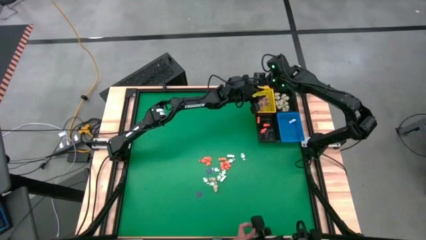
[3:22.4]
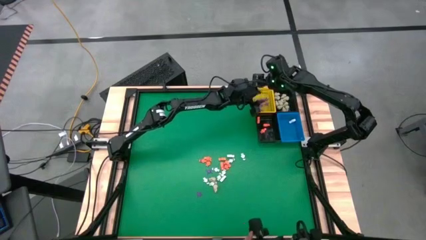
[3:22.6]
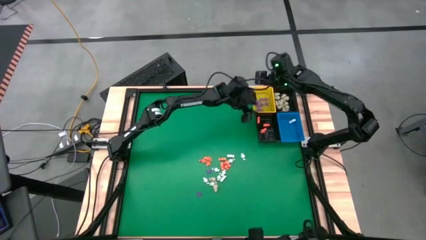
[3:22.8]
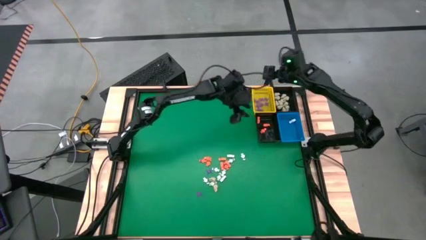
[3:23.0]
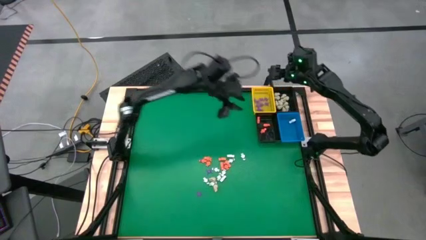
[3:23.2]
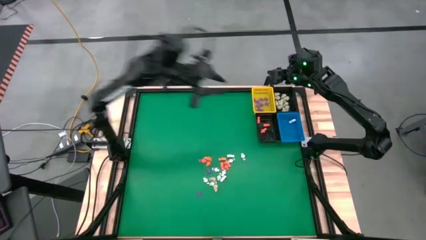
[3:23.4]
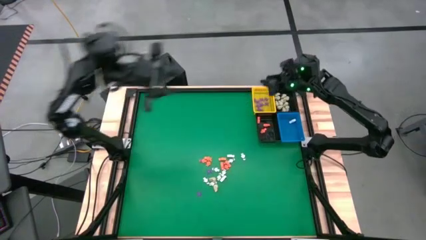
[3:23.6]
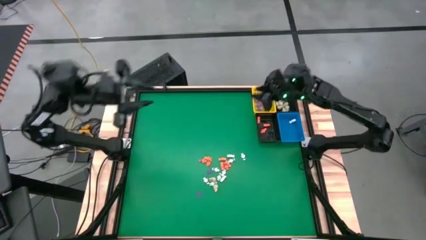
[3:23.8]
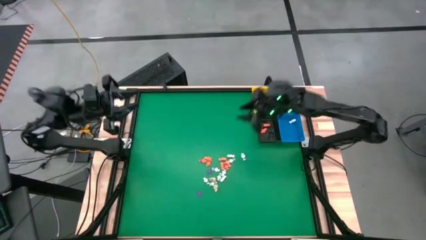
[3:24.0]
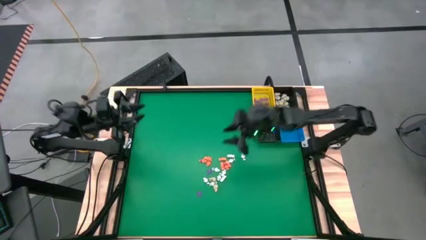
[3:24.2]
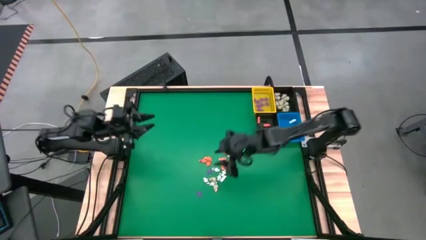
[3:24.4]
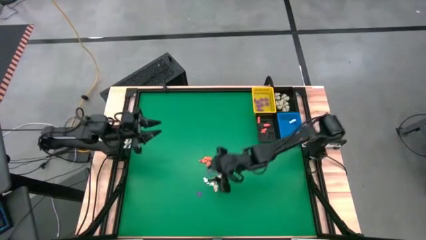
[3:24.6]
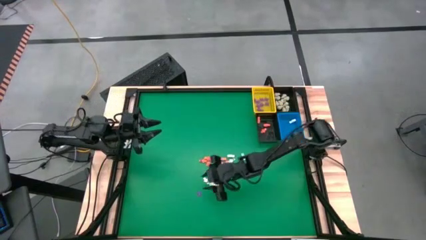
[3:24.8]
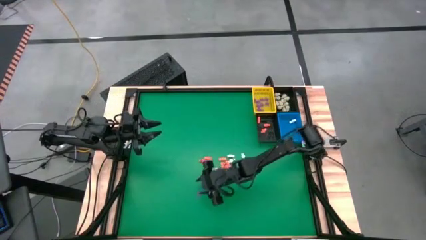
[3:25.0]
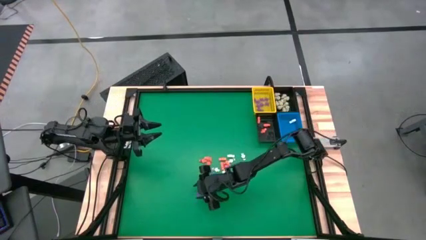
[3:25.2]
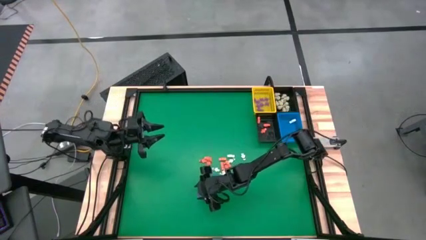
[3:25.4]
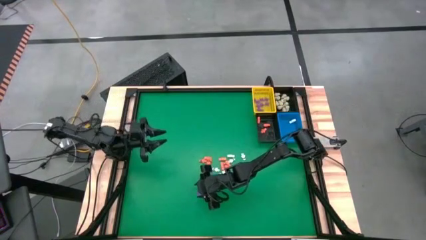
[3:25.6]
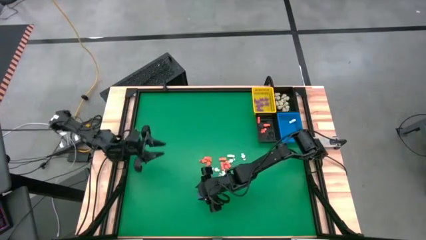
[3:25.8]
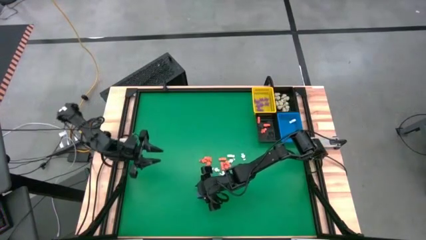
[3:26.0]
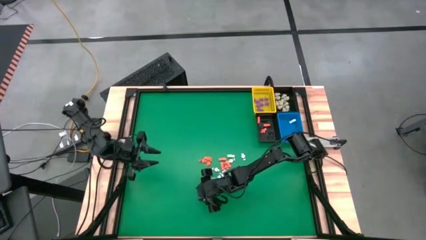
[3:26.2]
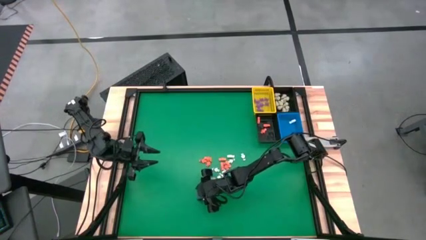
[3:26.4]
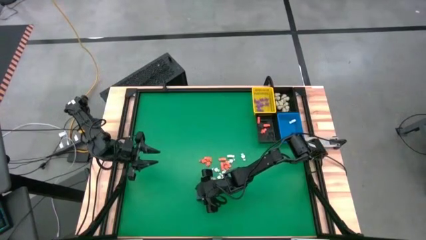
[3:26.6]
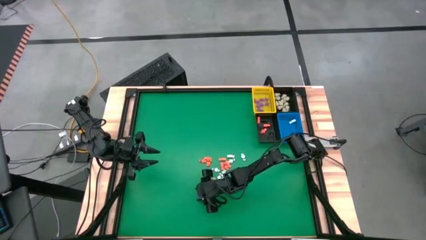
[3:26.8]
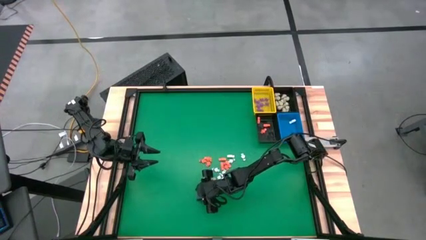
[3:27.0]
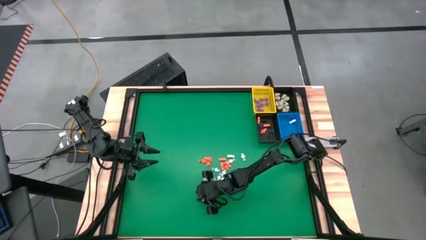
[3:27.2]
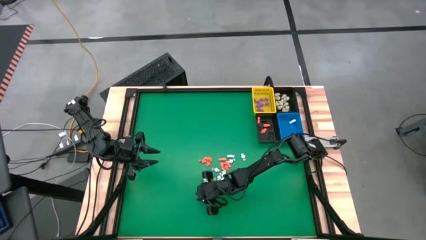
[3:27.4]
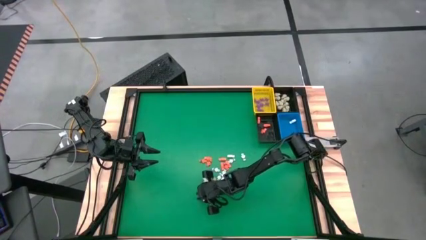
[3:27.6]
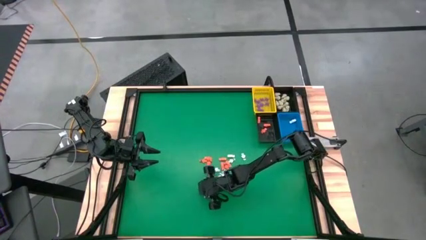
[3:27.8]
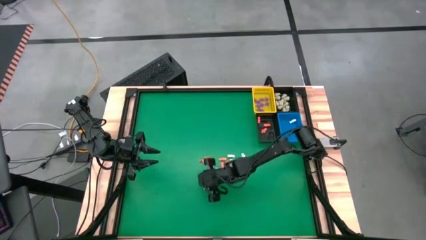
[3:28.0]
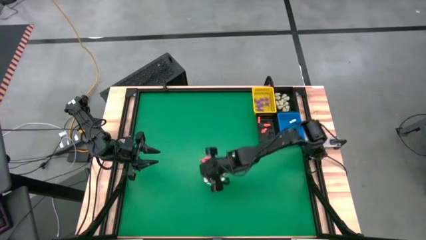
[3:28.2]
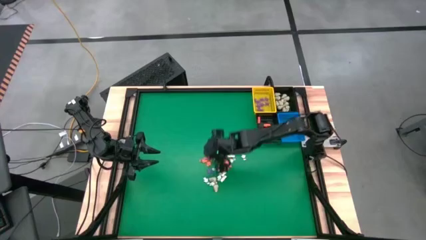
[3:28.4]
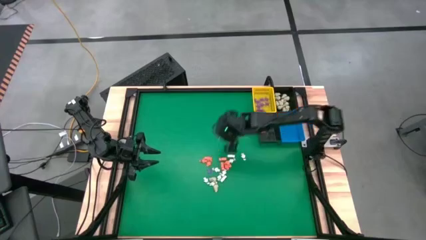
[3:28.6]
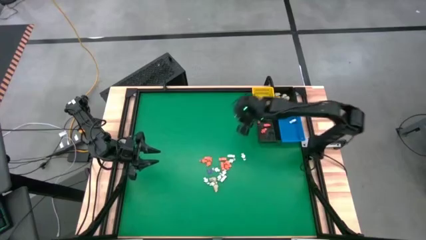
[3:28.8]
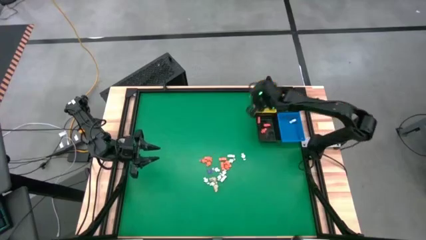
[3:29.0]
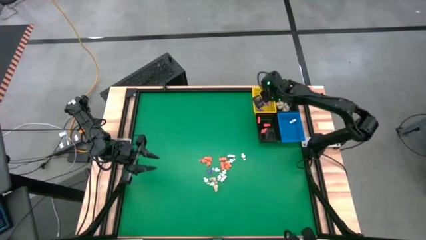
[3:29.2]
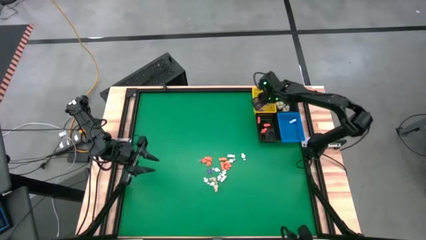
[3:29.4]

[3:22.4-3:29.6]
Task: Sort Halloween decoration
Put the purple spider toy into the yellow basket

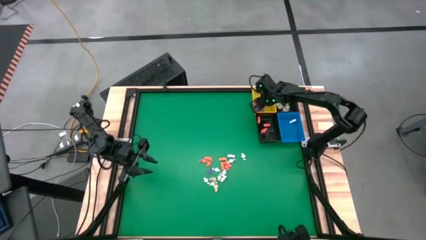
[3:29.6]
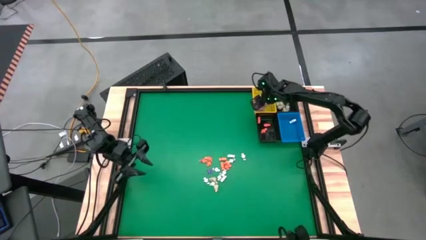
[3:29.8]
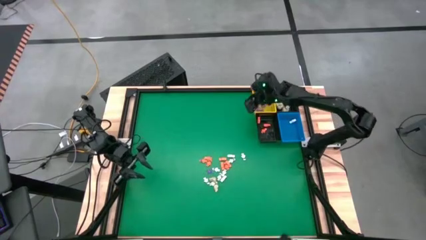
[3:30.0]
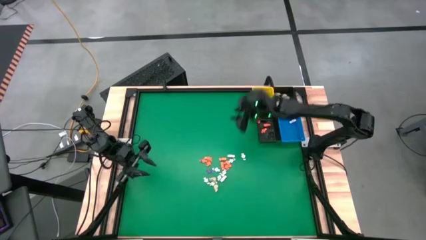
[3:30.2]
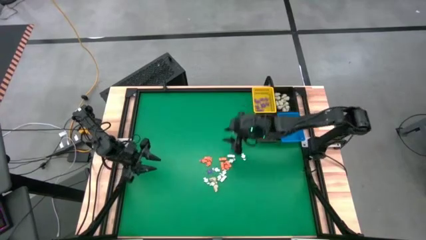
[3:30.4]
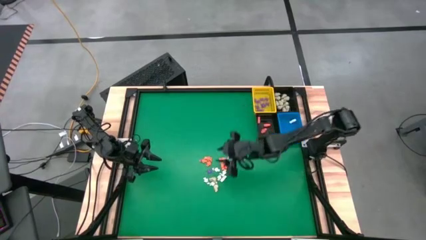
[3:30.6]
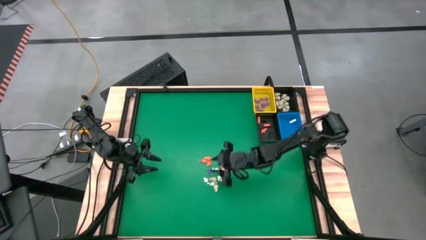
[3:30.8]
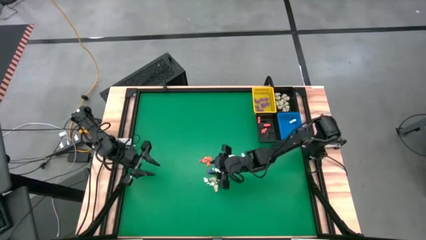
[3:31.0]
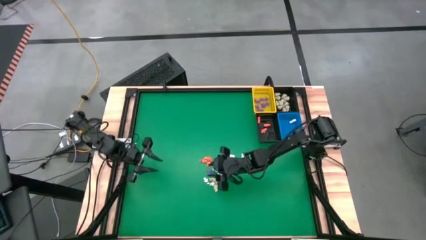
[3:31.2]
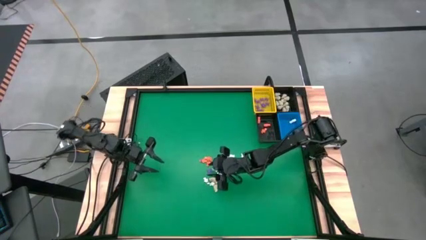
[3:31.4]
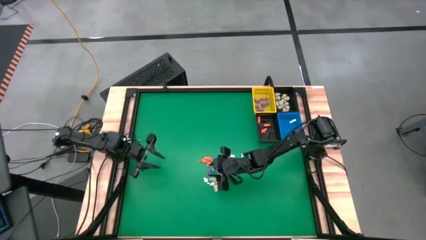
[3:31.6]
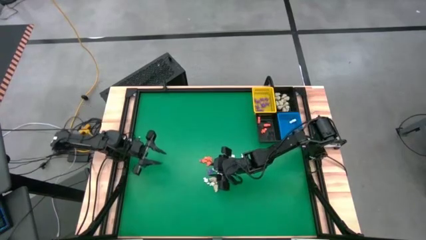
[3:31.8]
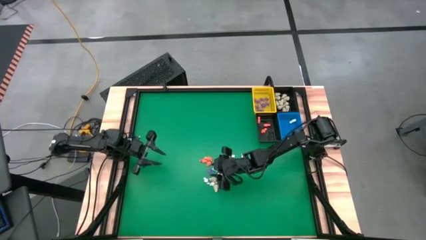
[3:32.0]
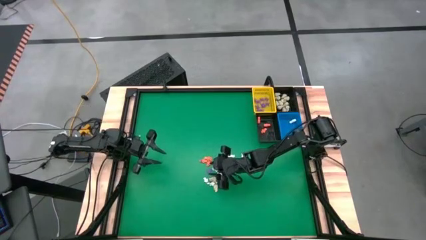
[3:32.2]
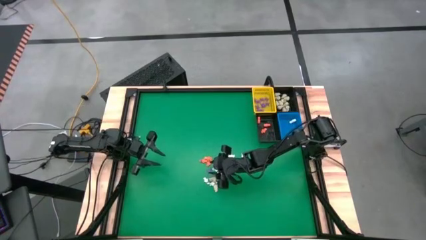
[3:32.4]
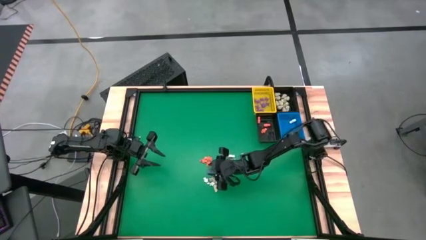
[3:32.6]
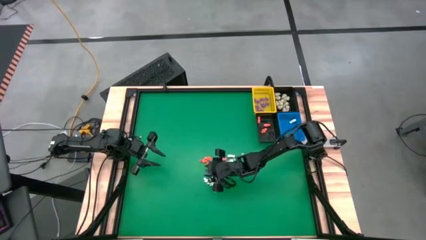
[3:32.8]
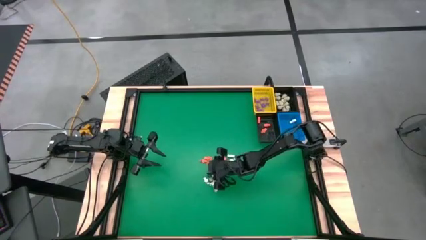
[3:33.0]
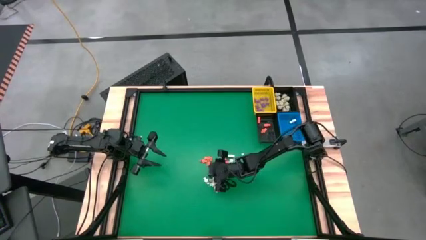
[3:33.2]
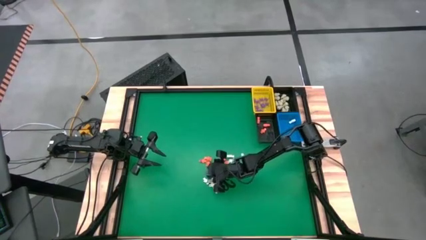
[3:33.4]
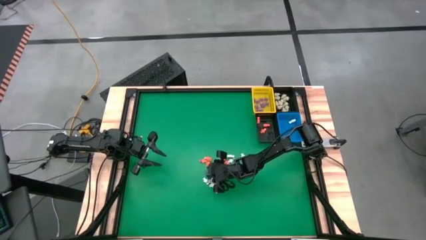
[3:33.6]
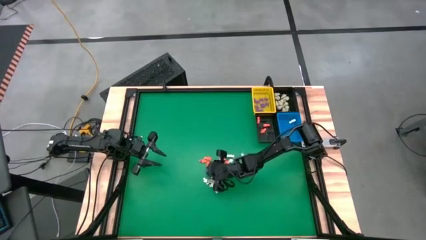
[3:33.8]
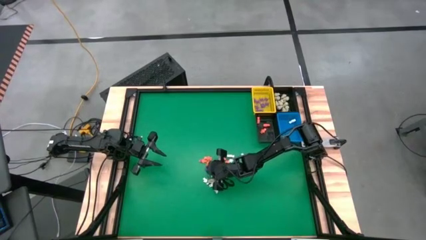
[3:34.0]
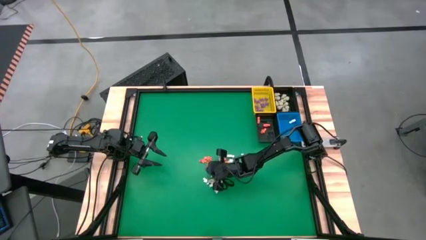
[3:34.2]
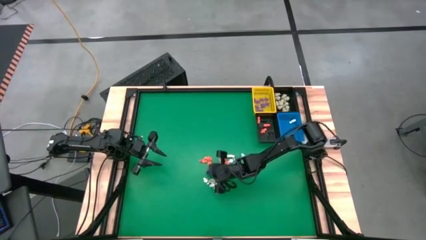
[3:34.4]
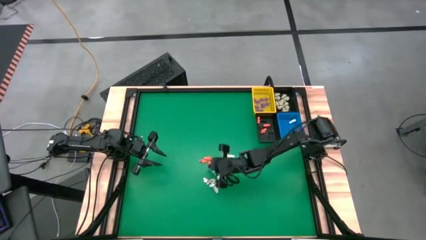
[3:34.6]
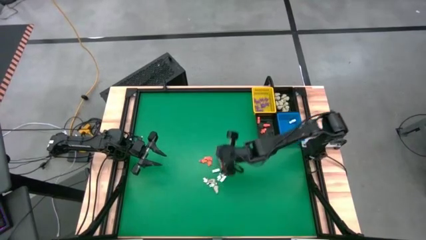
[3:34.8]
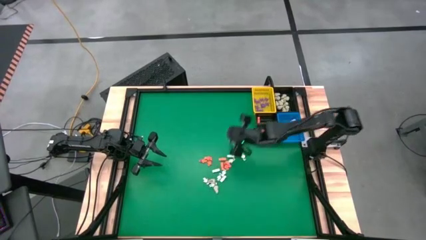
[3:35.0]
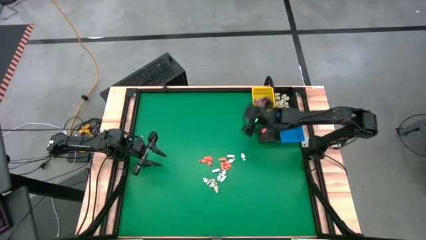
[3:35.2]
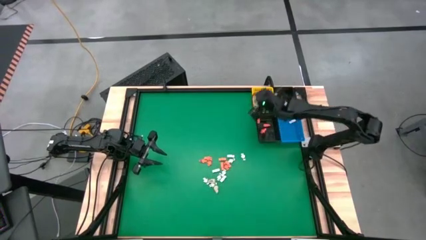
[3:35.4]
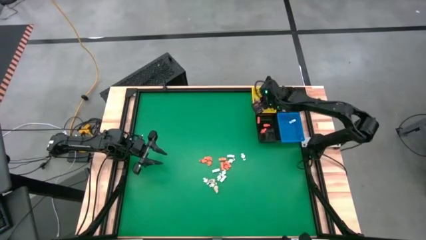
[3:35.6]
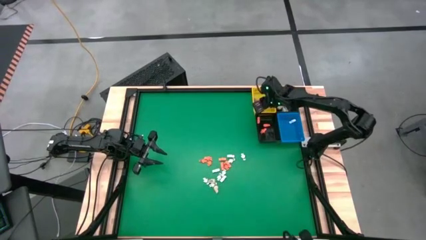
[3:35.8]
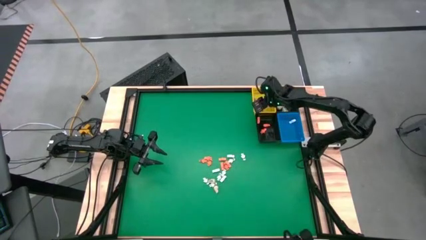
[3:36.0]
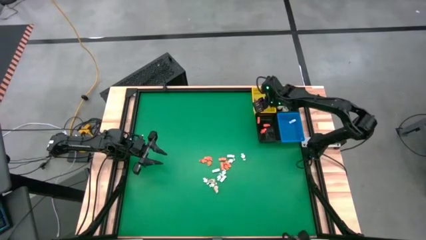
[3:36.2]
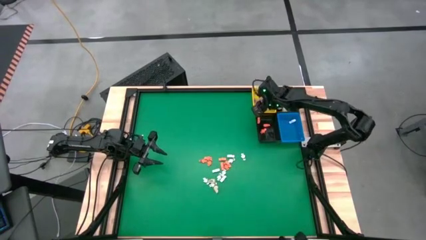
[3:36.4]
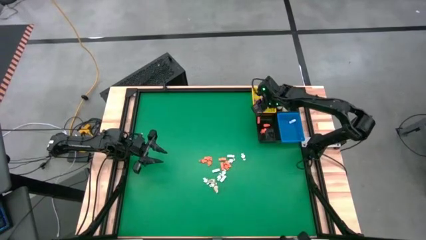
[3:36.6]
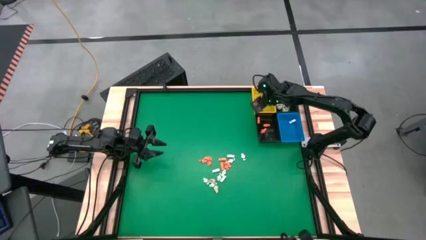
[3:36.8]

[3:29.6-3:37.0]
Put the purple spider toy into the yellow basket

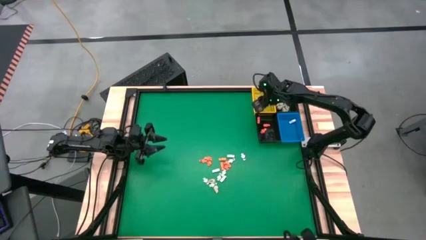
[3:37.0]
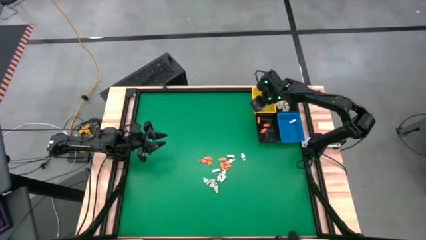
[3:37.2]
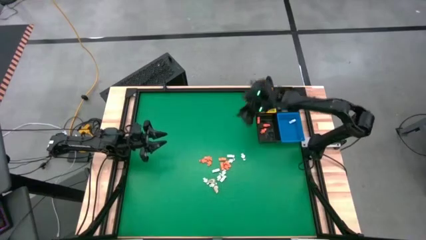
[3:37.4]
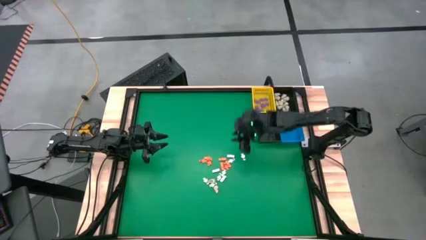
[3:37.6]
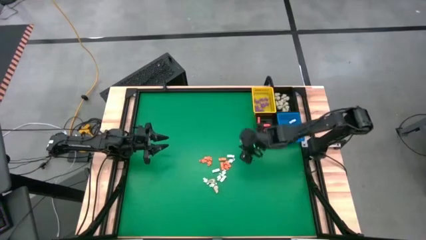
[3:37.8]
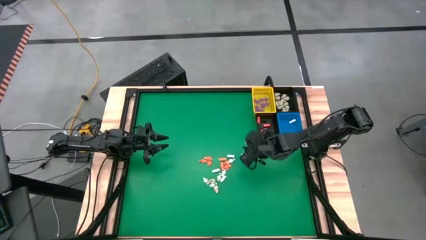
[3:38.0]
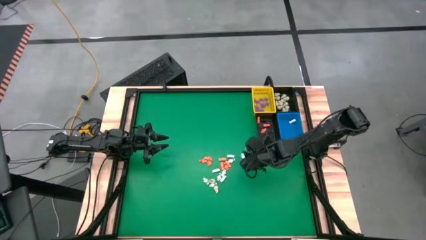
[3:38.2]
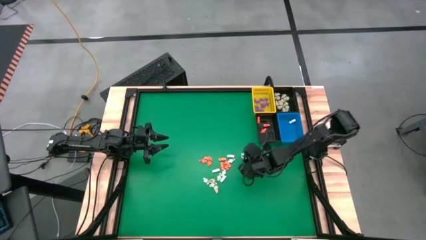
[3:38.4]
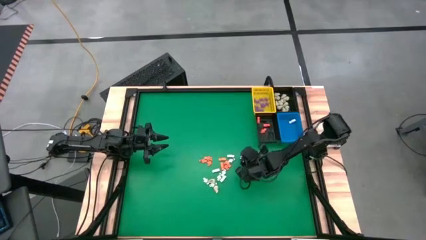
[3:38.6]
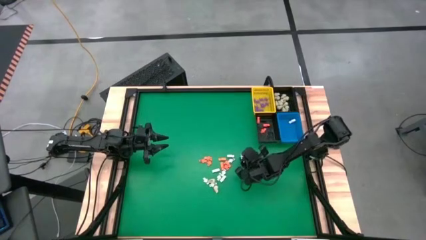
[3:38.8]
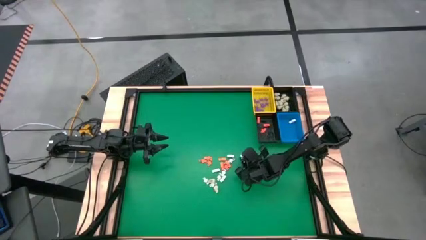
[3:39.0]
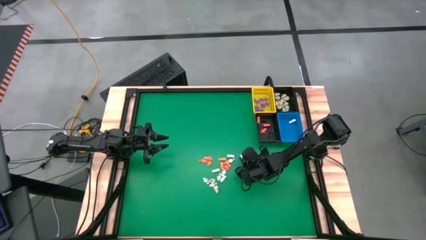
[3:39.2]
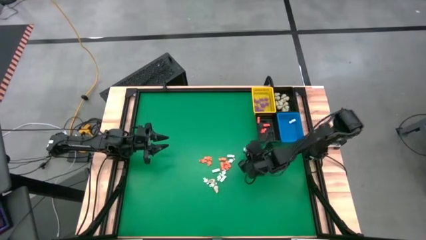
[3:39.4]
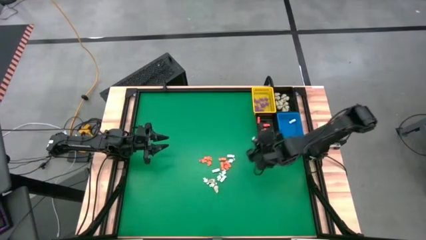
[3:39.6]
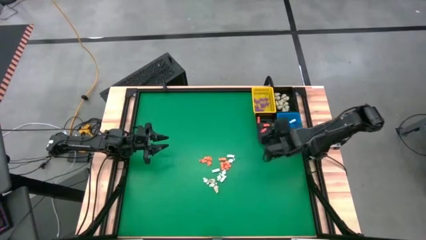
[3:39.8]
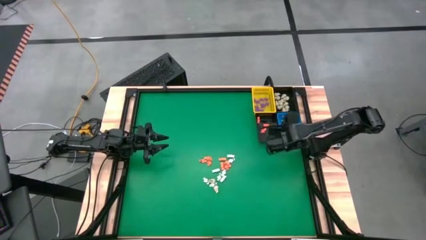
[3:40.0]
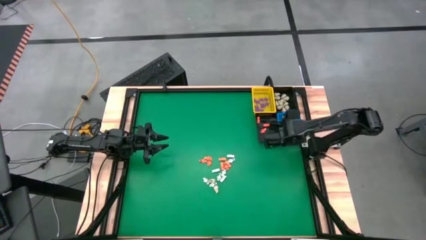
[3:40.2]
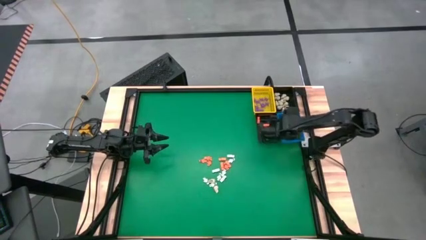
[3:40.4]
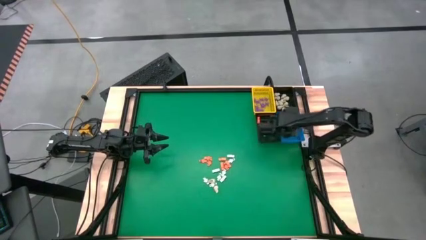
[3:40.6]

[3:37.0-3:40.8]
Put the white skeleton toy into the blue basket
